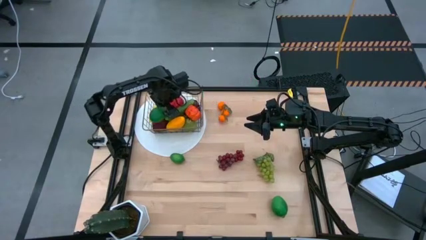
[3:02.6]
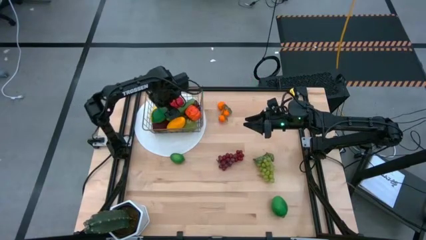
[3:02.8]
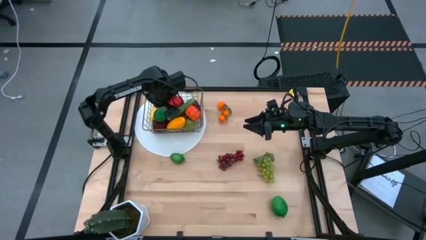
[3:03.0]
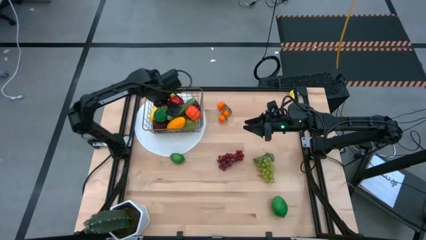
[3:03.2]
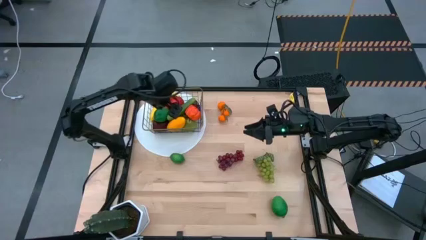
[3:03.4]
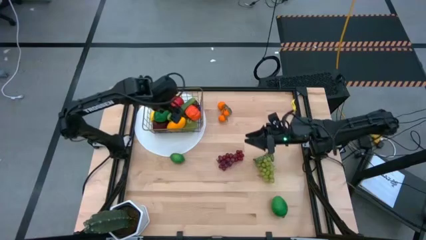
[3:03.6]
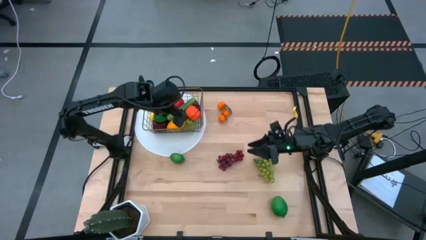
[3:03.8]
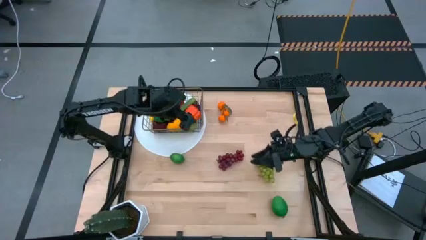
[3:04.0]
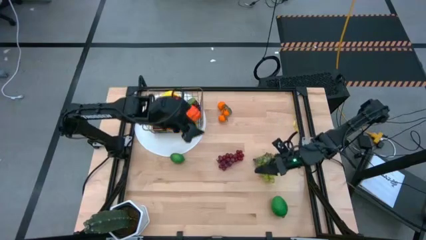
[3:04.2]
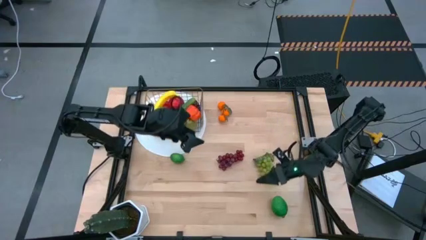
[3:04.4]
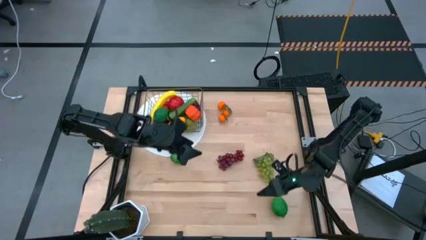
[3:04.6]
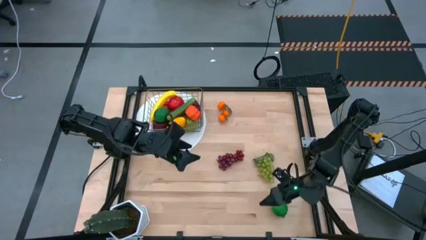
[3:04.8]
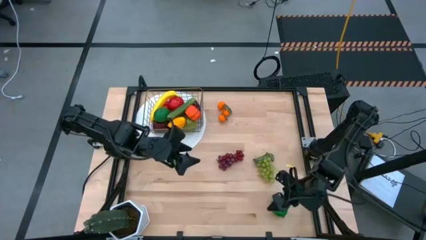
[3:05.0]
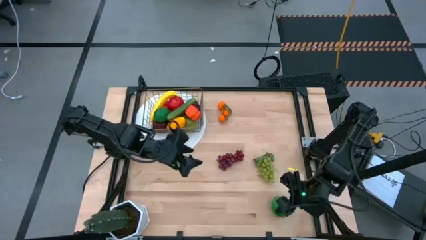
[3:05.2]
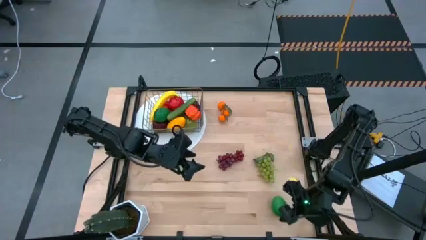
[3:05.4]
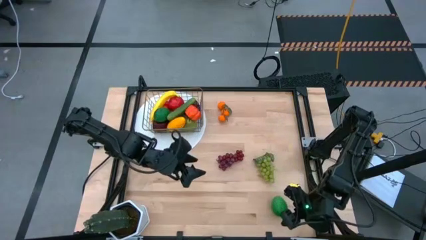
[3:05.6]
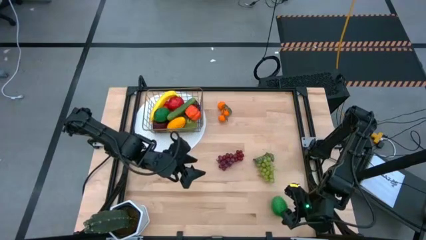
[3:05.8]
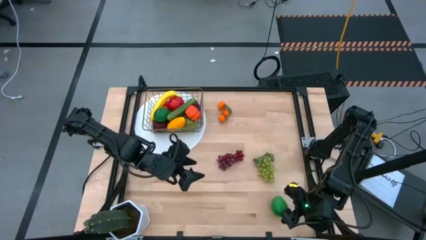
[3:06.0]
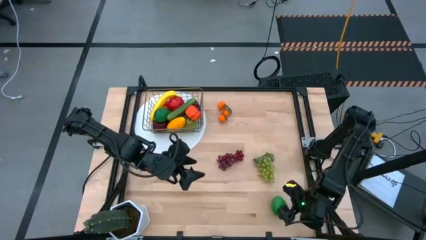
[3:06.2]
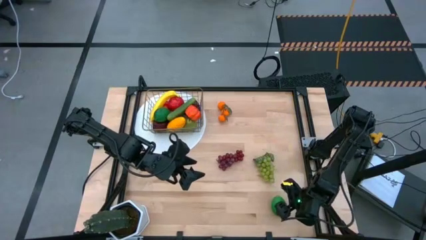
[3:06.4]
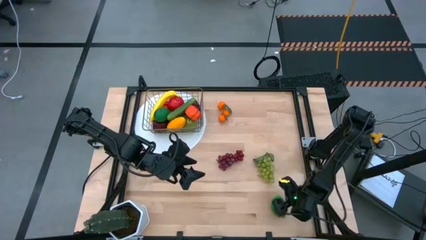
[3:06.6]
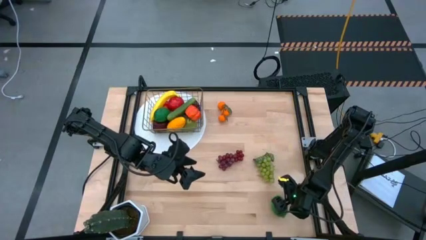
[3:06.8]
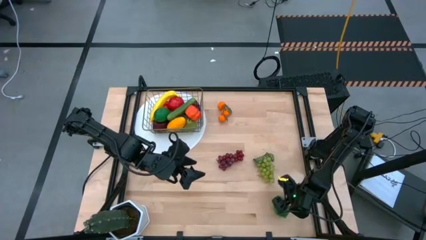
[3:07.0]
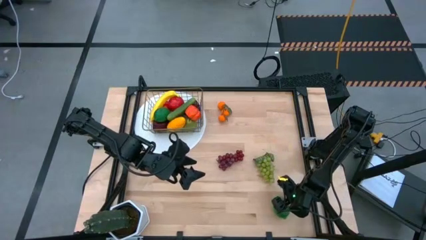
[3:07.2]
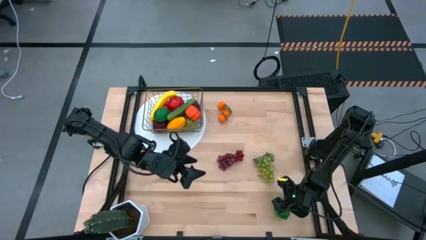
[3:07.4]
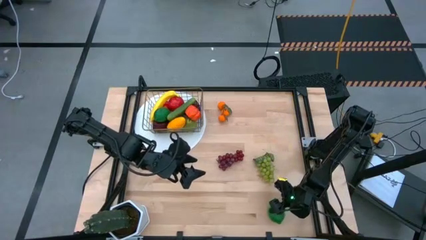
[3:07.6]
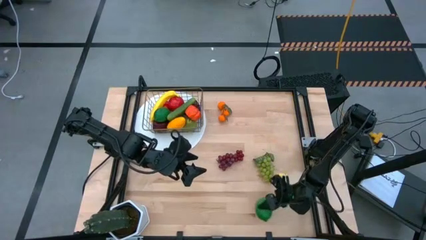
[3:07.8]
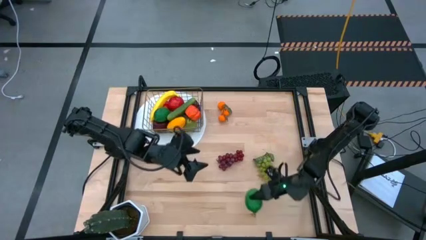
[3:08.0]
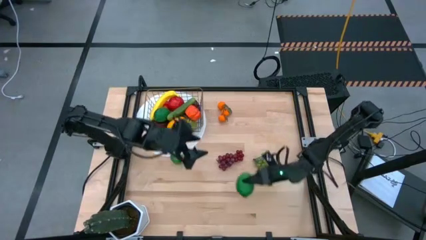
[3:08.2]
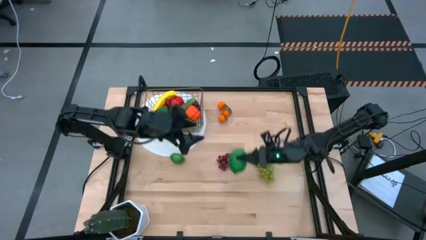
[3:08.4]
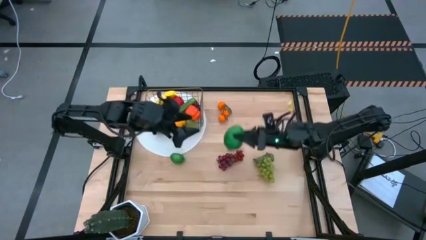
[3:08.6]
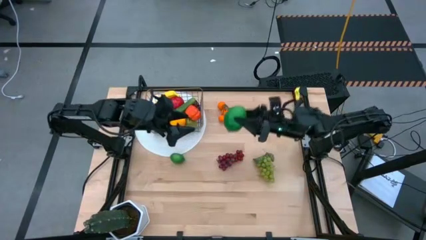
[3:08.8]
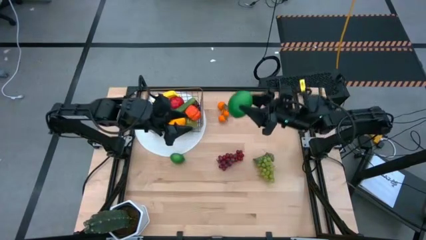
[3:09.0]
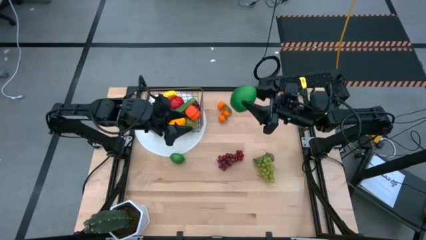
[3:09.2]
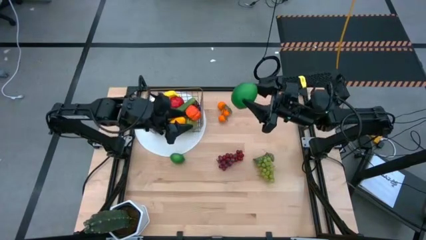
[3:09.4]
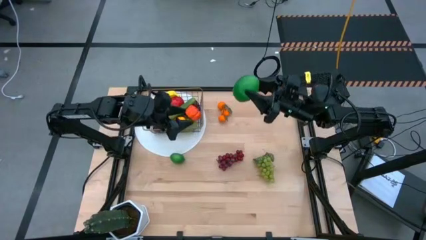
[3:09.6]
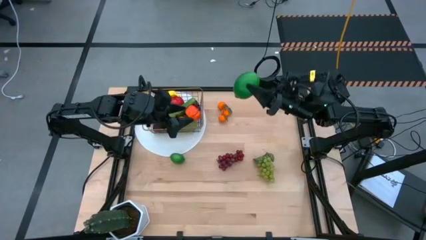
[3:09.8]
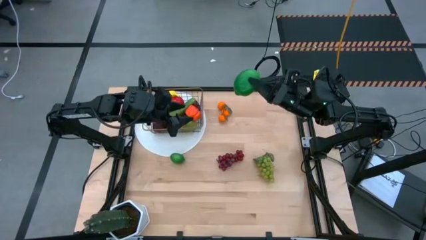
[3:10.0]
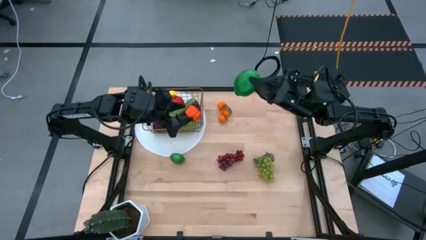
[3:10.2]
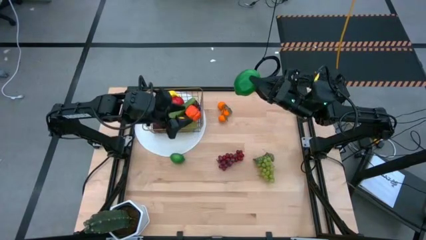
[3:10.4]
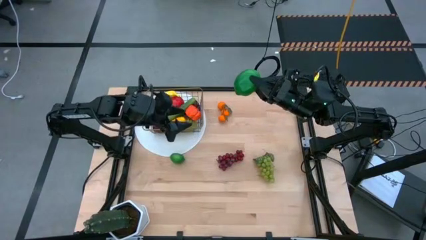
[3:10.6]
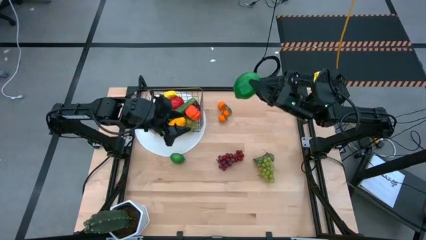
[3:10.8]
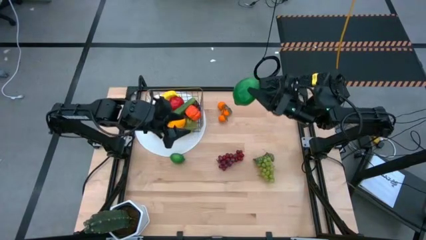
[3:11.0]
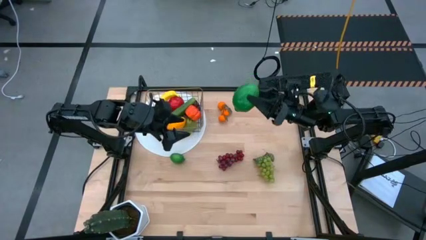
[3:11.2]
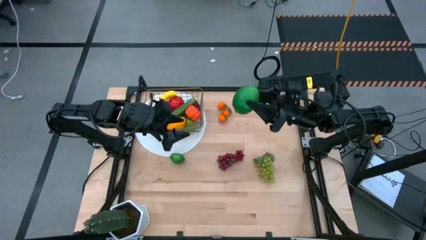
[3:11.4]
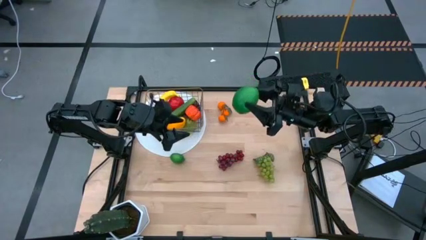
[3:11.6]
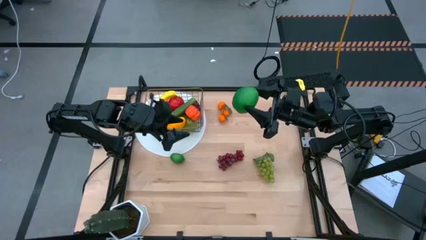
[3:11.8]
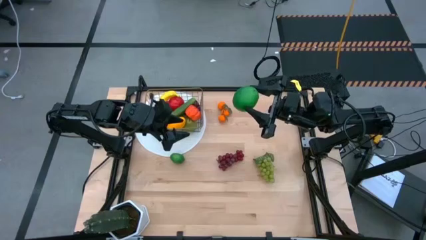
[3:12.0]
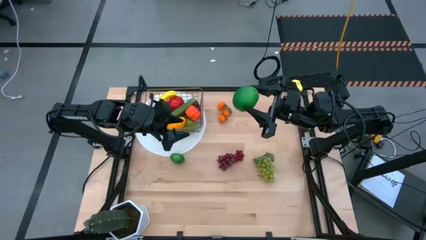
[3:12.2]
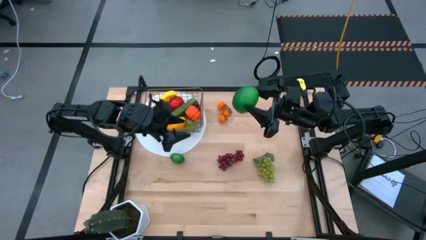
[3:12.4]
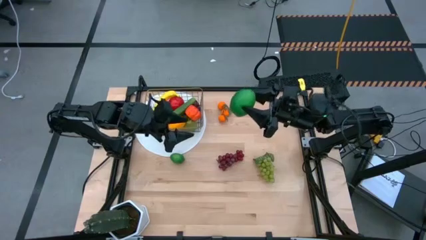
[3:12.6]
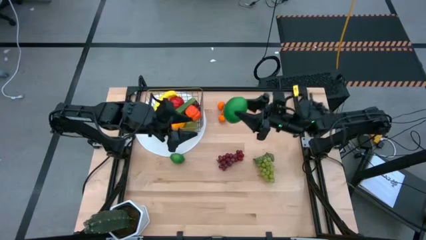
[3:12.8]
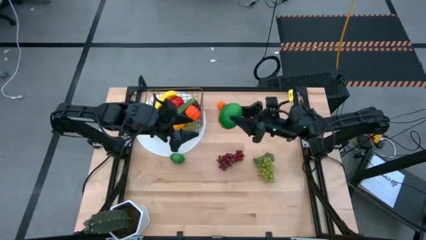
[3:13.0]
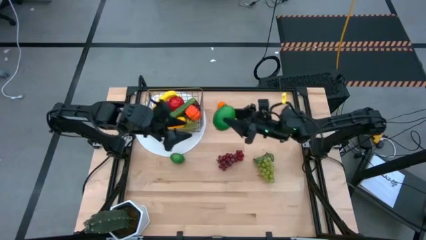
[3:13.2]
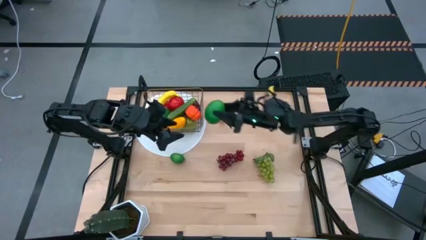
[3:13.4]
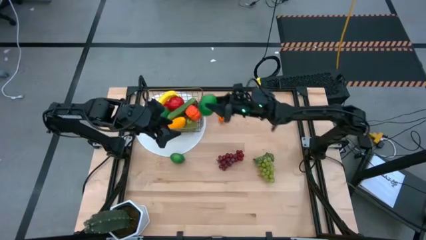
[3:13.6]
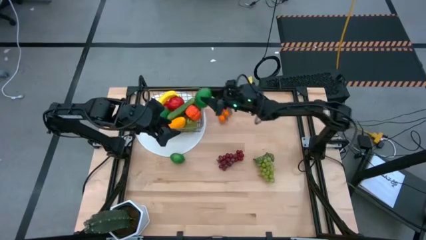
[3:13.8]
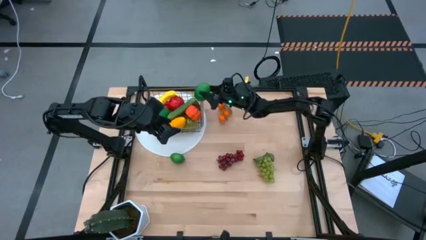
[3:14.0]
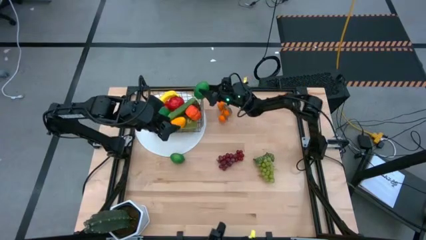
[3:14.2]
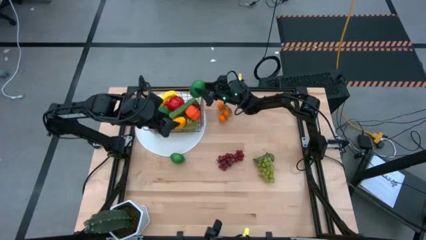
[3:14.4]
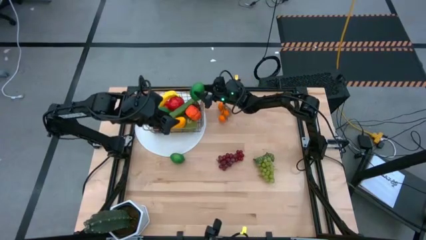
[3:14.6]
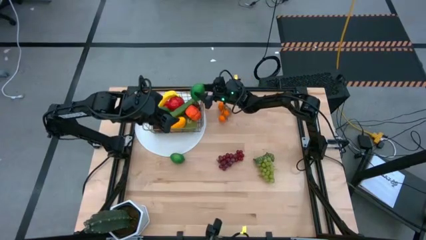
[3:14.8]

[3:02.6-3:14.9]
Task: Build produce basket
Put the bottom lime into the wired basket

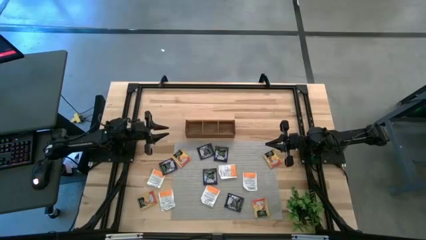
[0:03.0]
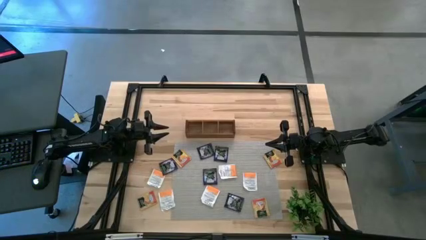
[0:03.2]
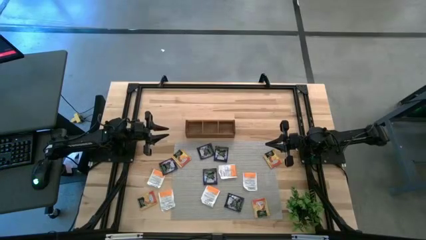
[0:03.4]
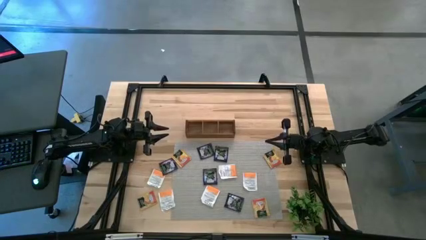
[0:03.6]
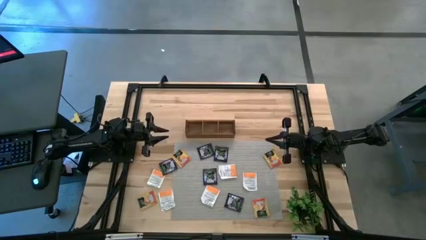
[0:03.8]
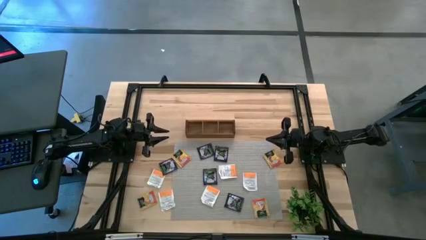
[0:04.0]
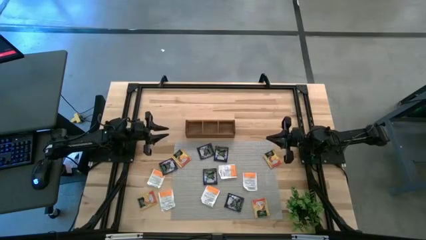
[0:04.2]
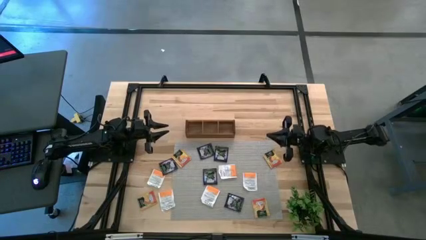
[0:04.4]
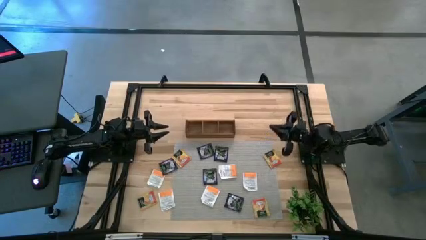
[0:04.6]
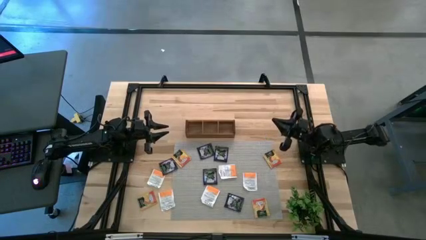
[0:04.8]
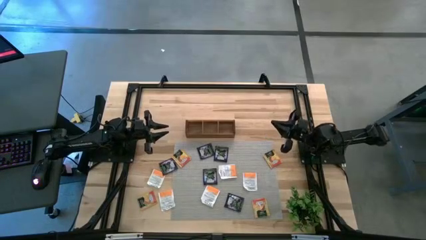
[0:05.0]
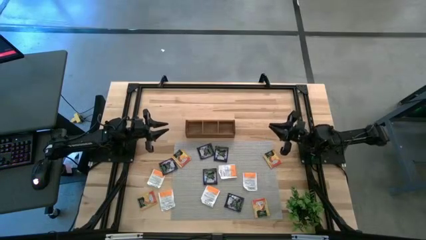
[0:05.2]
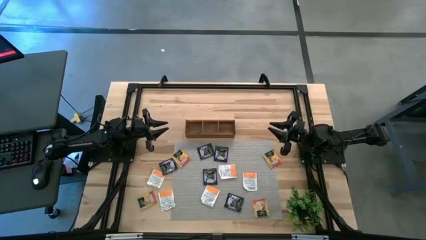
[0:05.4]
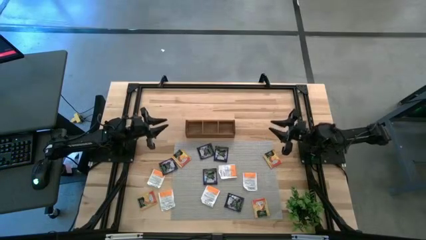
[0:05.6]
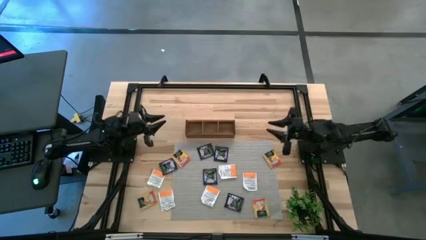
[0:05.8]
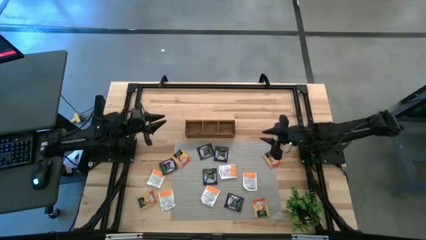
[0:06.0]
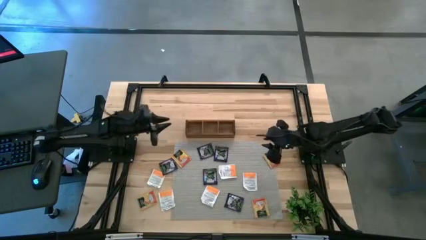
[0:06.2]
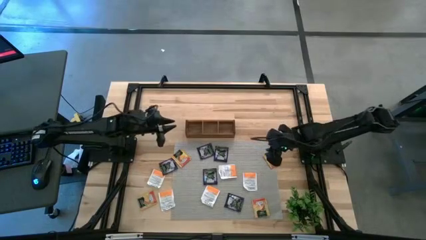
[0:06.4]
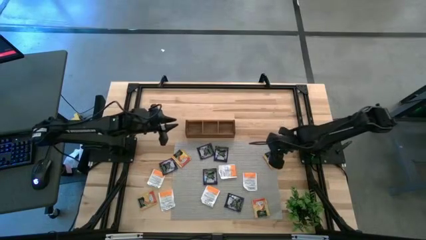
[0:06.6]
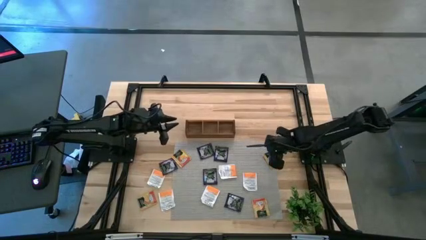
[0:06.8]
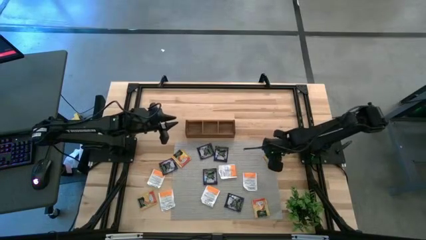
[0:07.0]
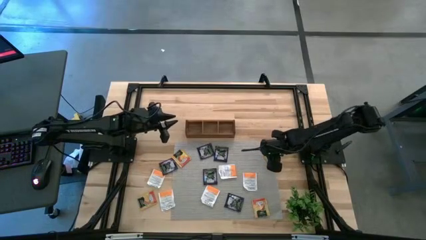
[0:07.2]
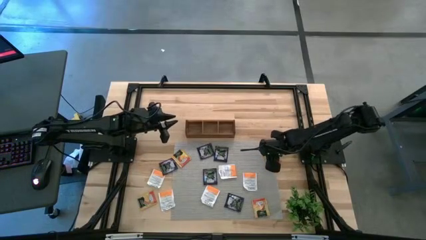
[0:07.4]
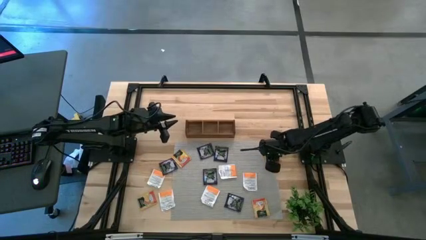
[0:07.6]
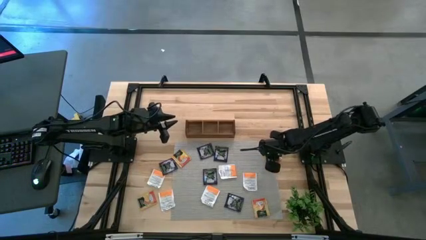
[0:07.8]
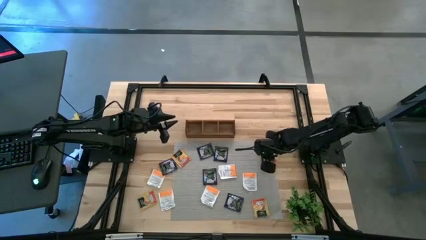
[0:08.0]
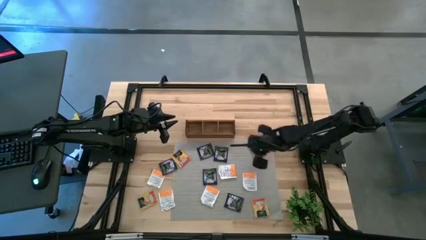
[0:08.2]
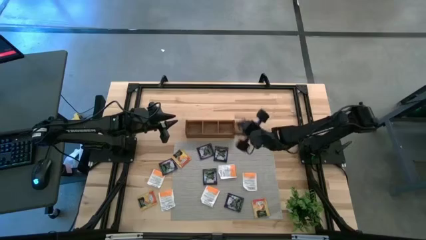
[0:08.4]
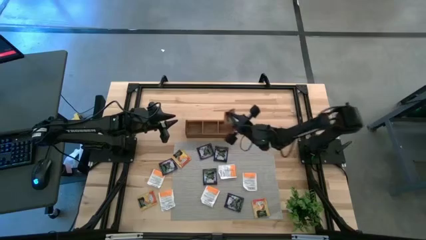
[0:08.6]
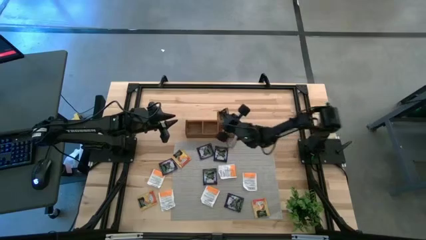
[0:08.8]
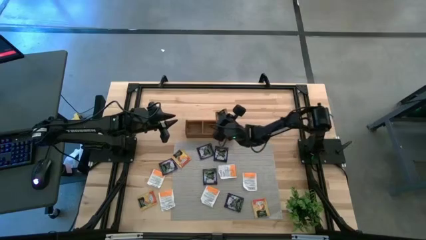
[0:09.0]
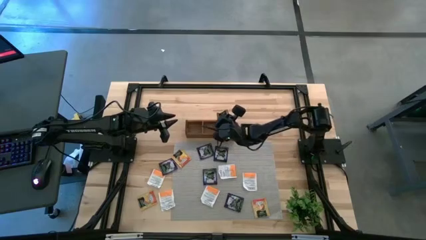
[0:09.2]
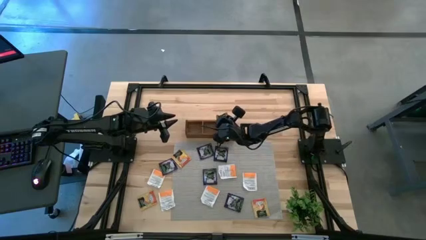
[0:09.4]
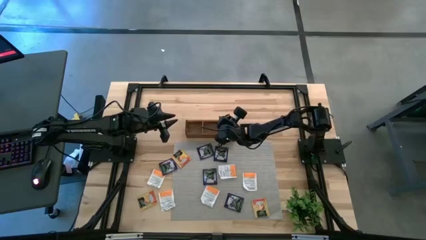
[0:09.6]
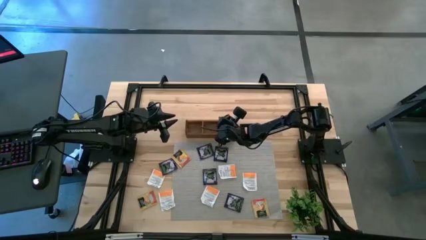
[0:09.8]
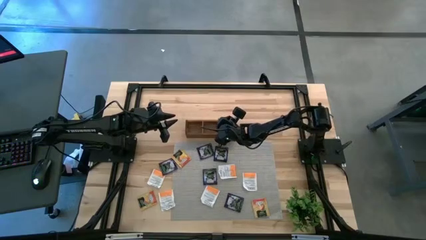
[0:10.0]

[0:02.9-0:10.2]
Task: Pick & Place Tea
Put the orange tea bag into the right section of the wooden organizer
